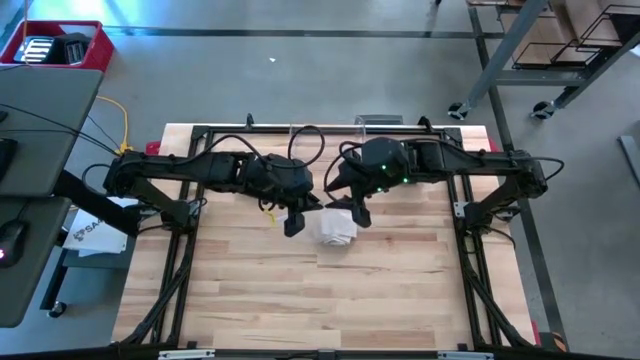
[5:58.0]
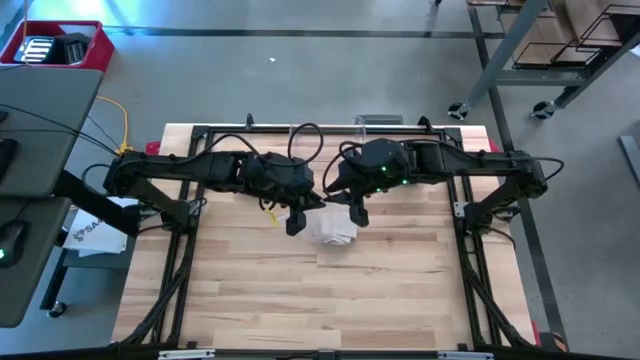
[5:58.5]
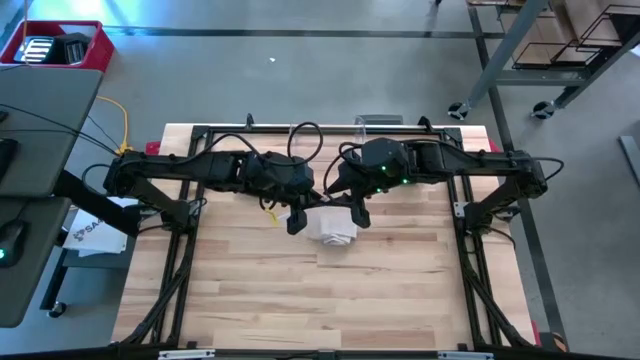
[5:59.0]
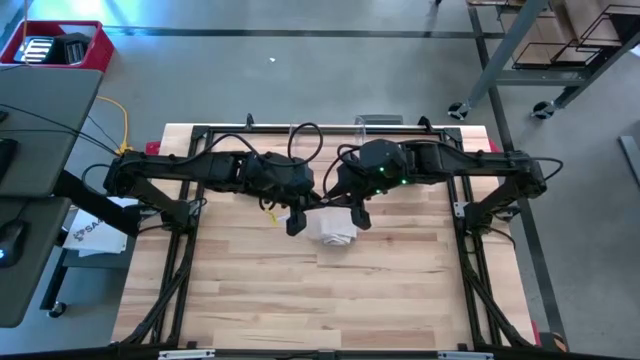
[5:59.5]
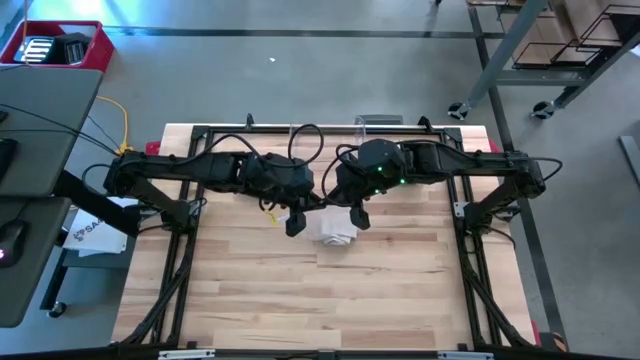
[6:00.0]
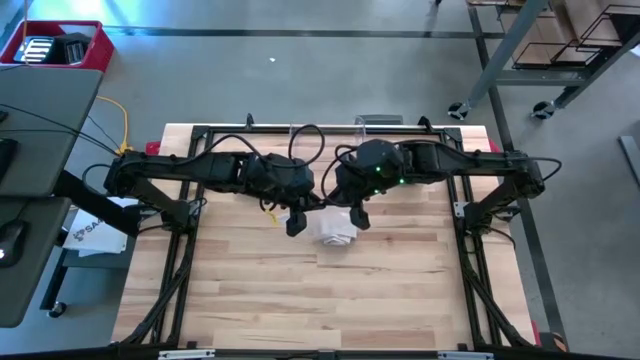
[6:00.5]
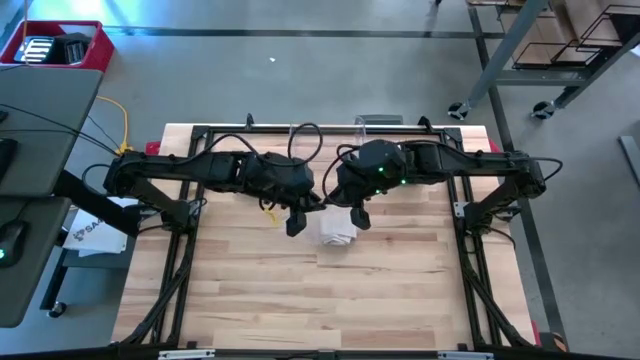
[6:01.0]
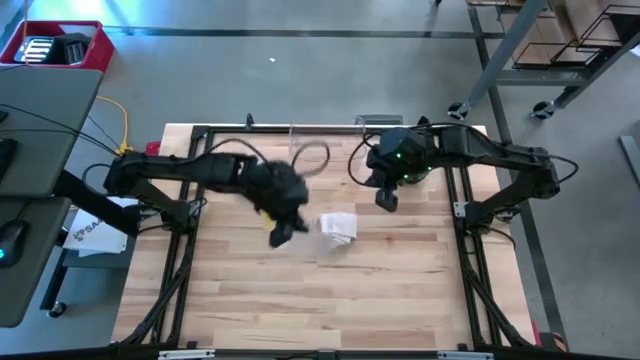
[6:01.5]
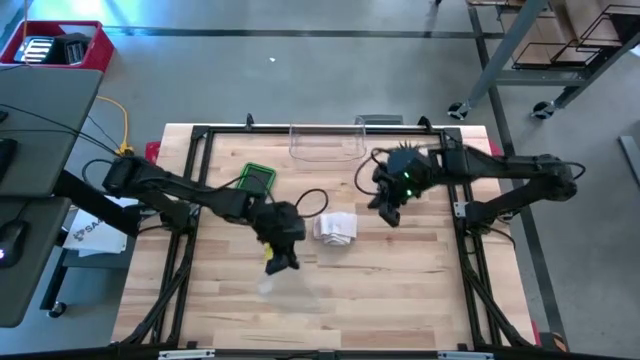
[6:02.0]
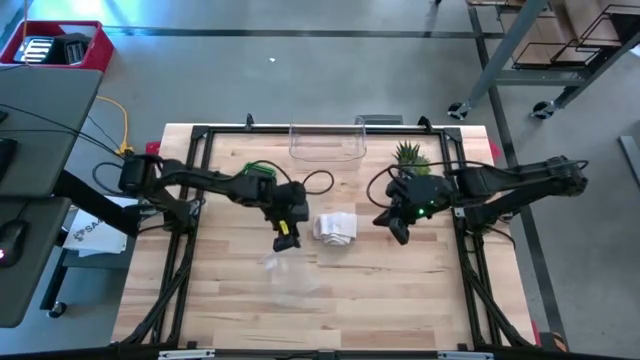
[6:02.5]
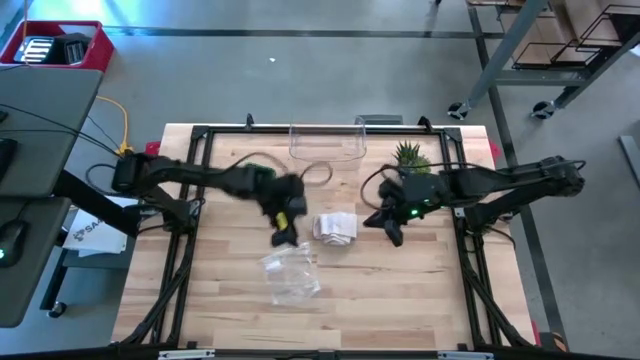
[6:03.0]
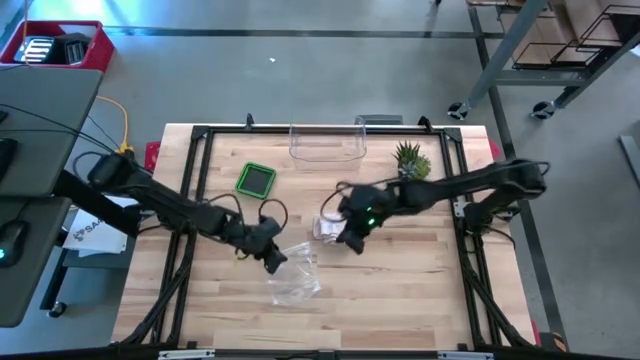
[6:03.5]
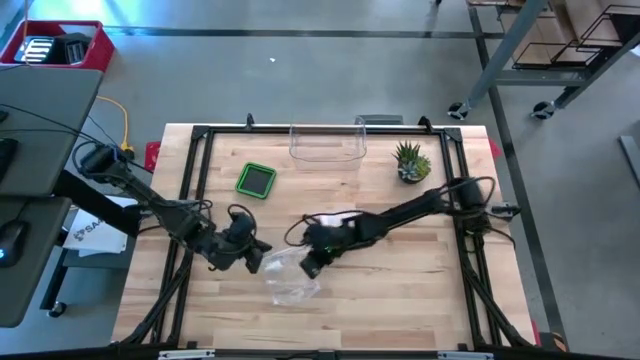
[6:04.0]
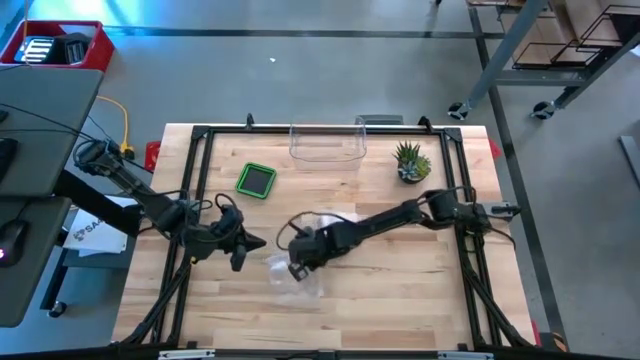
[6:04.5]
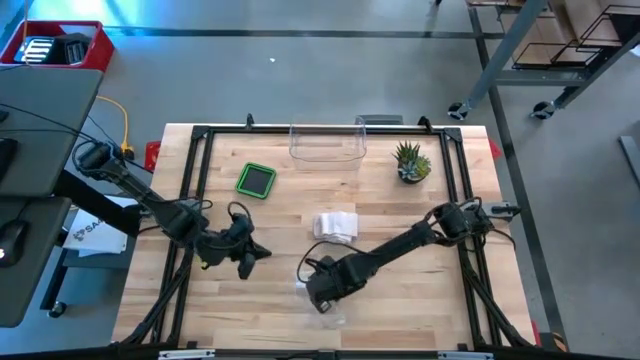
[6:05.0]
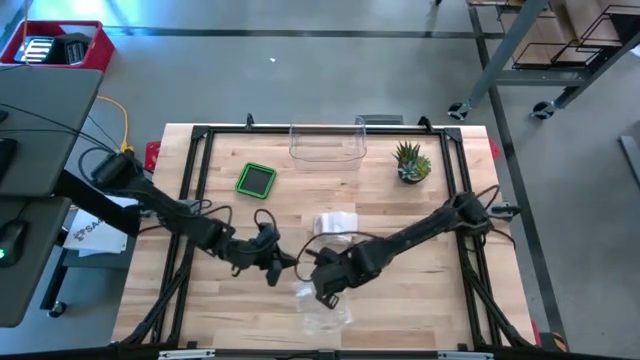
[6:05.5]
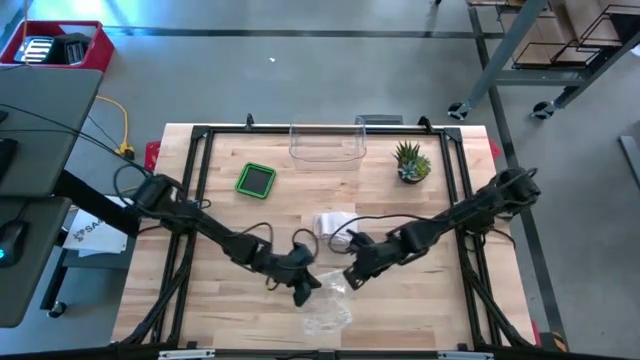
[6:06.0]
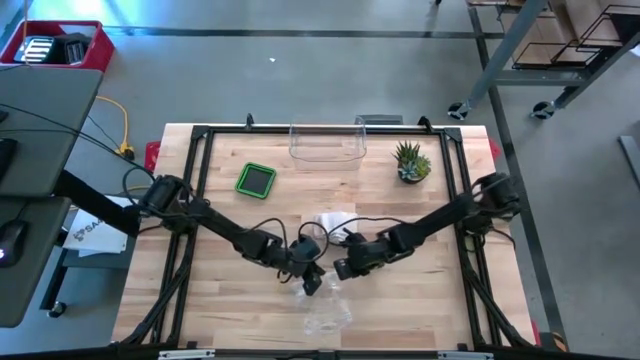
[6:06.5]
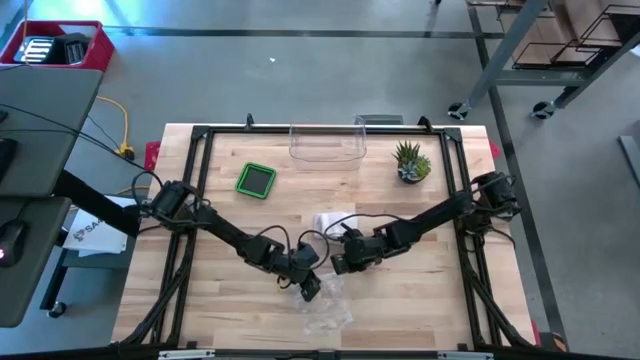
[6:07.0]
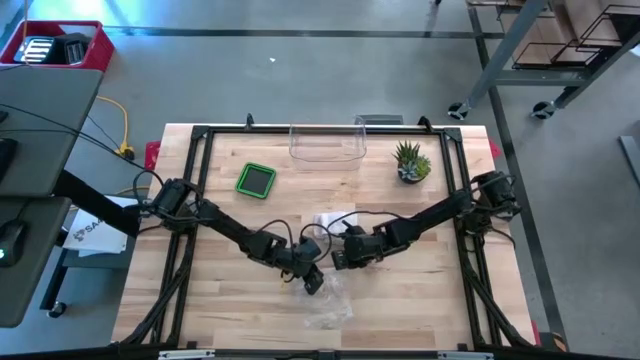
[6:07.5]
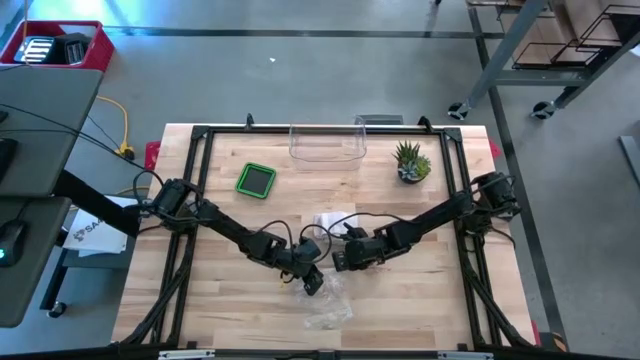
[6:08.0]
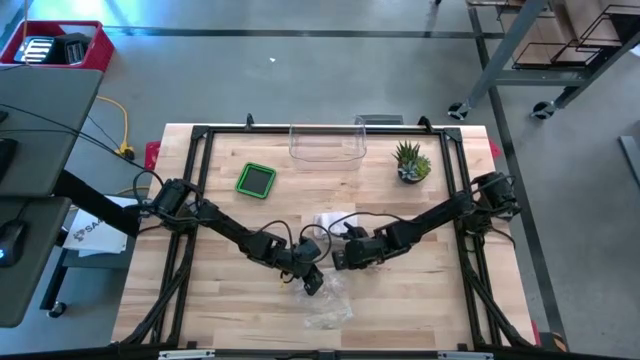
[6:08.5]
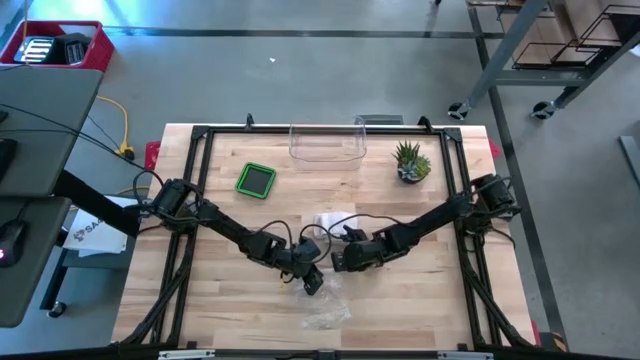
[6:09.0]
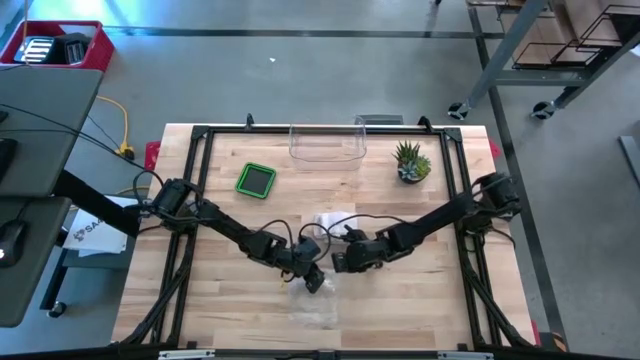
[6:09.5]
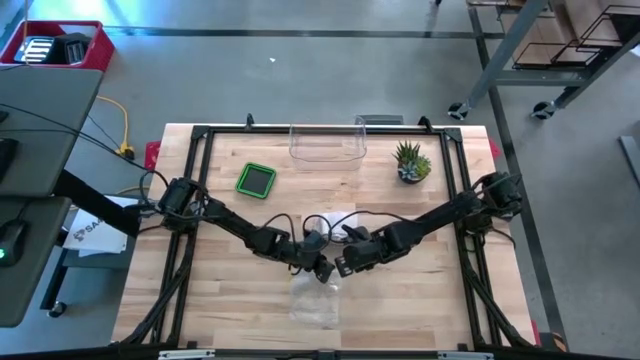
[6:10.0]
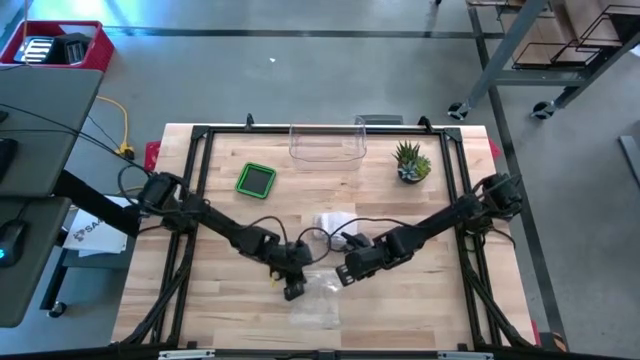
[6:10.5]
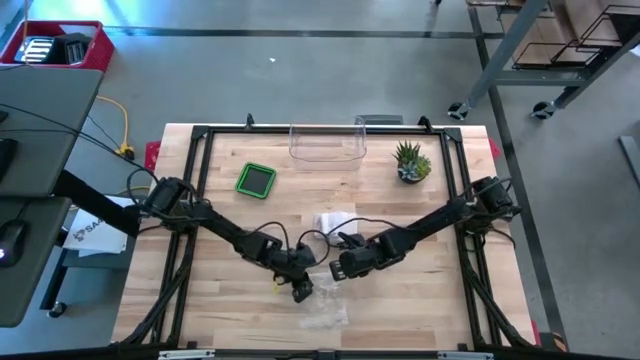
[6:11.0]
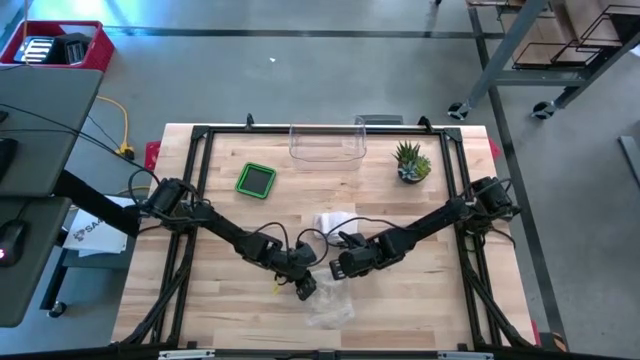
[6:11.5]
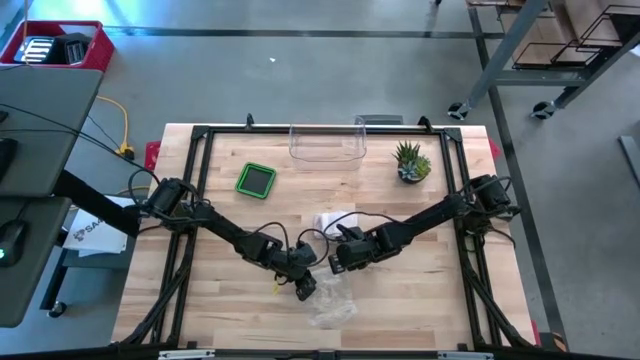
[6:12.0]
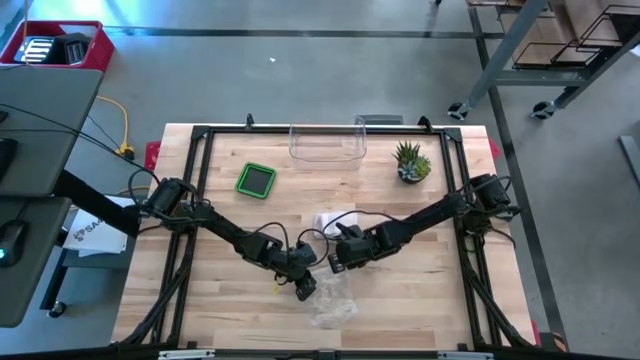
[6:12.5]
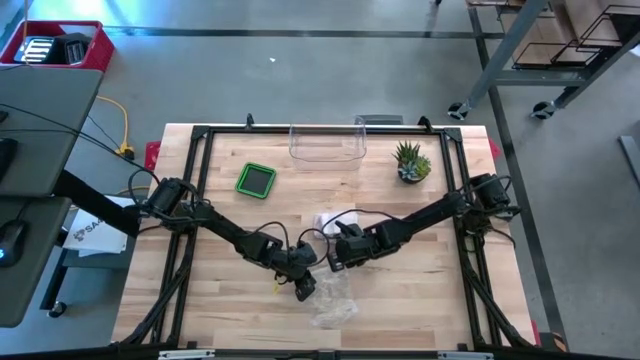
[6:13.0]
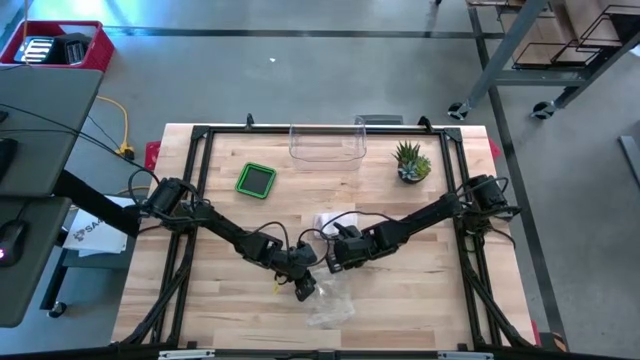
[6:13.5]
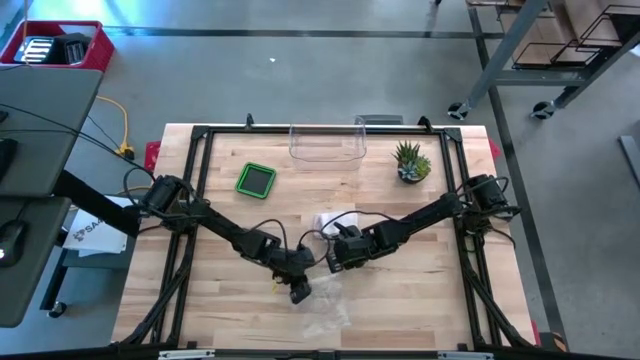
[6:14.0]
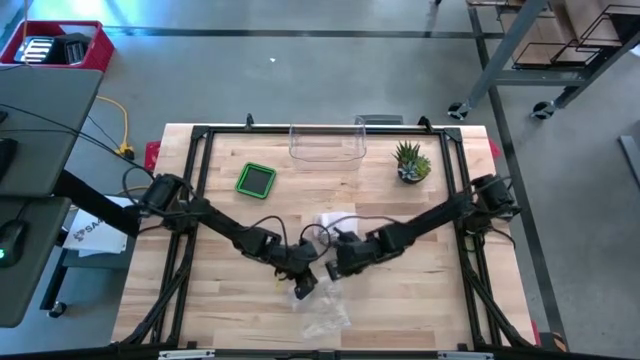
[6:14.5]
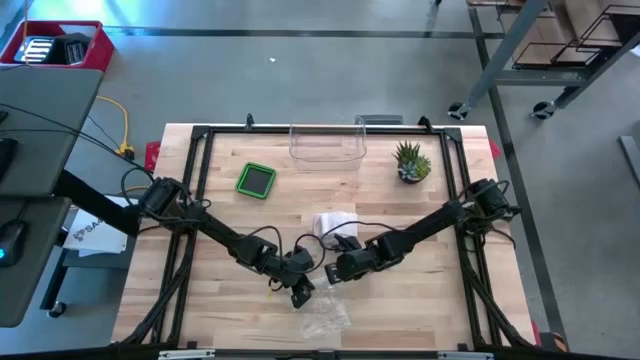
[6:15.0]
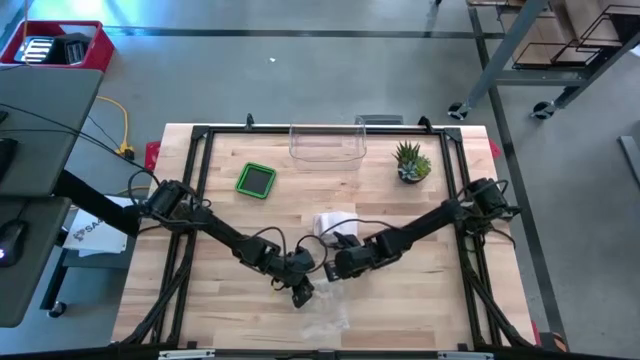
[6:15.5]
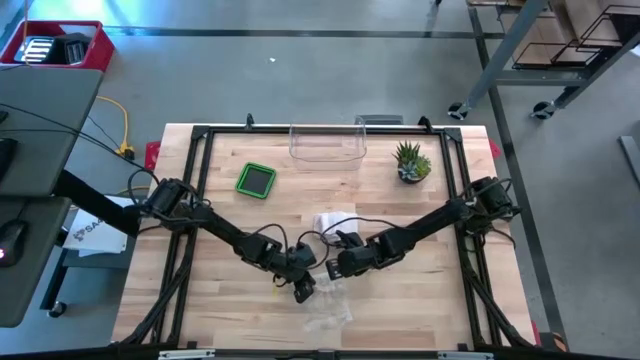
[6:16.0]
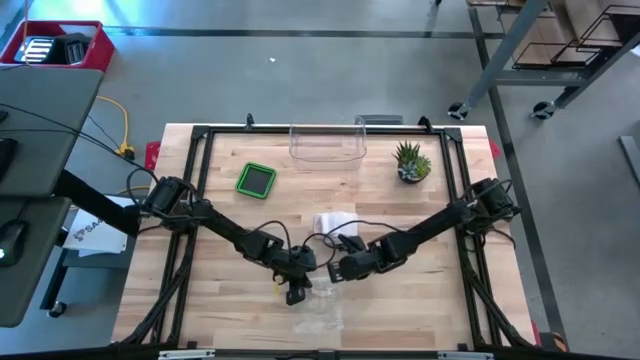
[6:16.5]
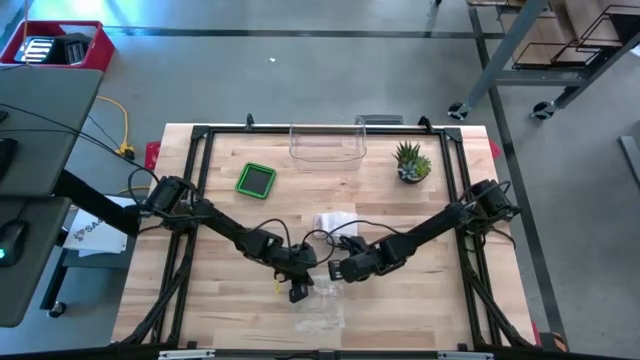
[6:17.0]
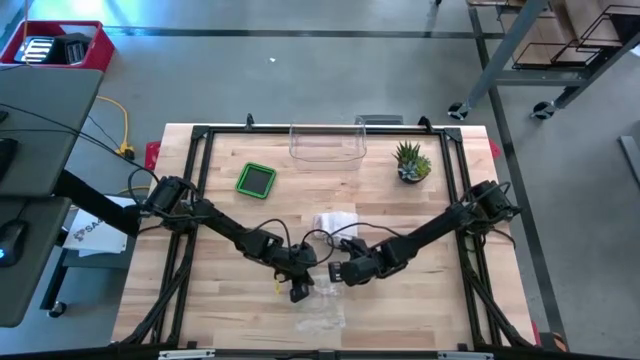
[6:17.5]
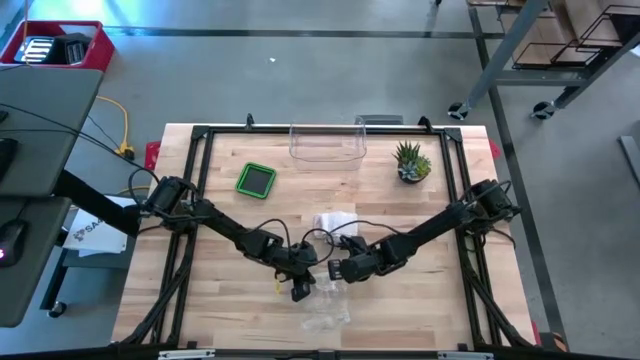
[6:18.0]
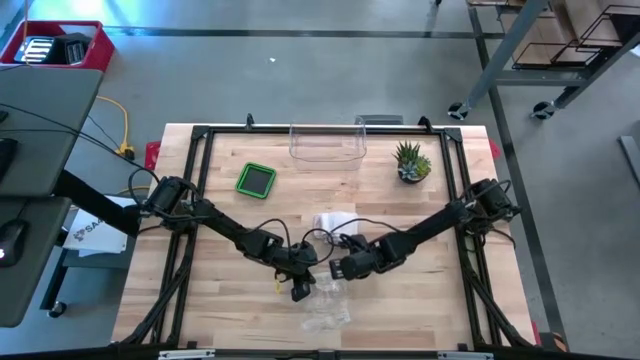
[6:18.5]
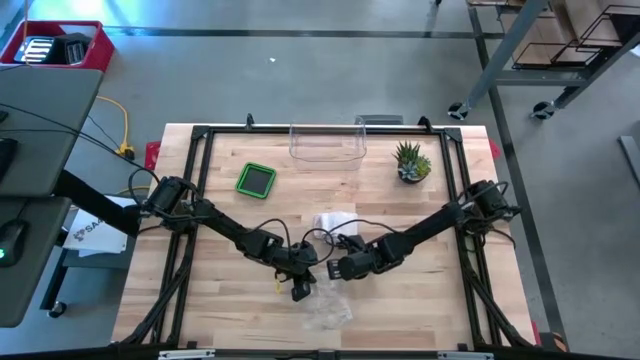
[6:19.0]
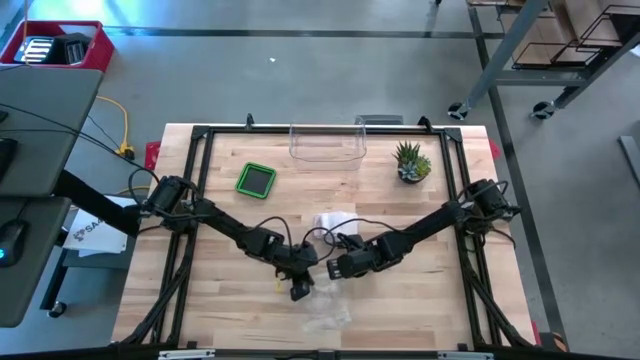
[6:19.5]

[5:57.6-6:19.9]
Task: Roll bandage
Open the transparent zip bag
